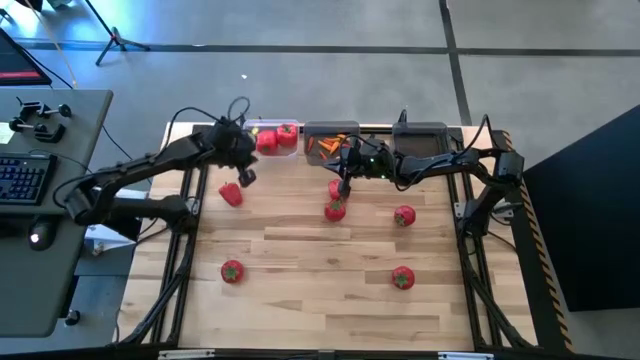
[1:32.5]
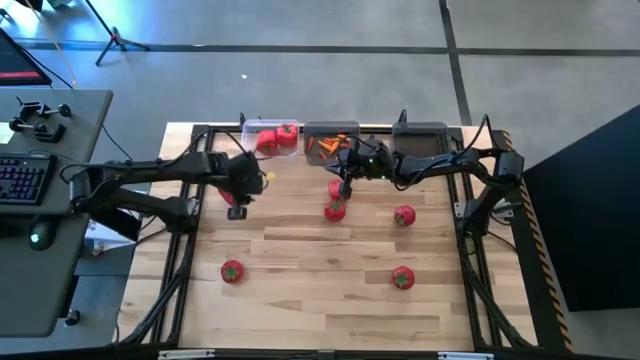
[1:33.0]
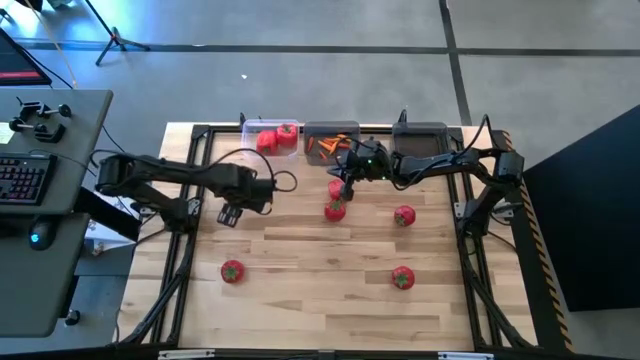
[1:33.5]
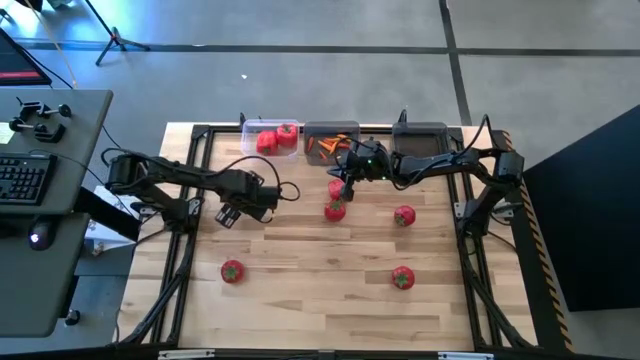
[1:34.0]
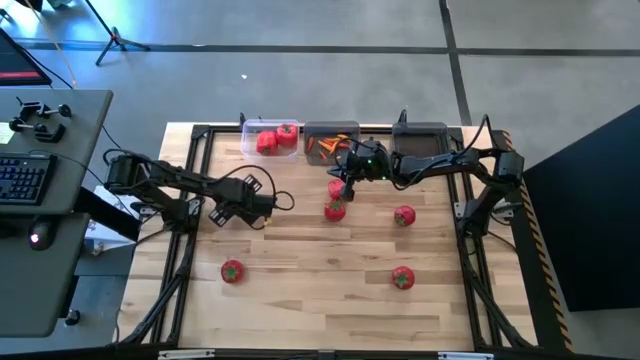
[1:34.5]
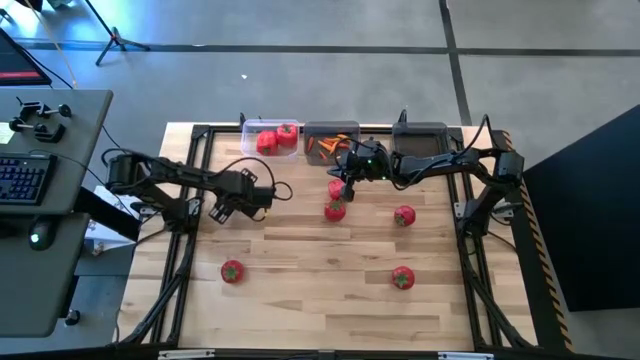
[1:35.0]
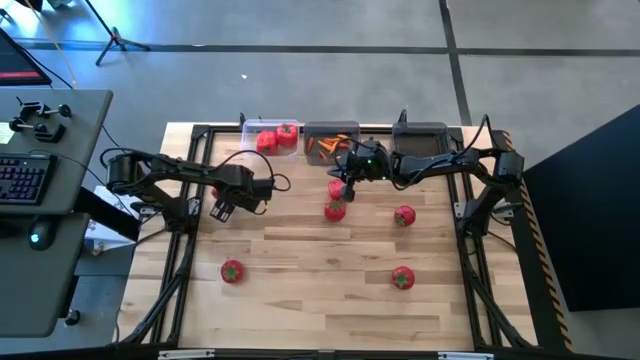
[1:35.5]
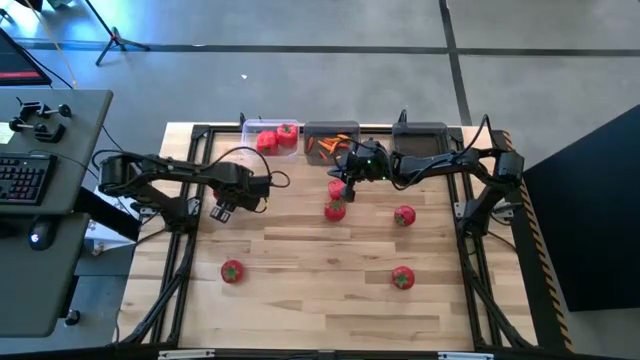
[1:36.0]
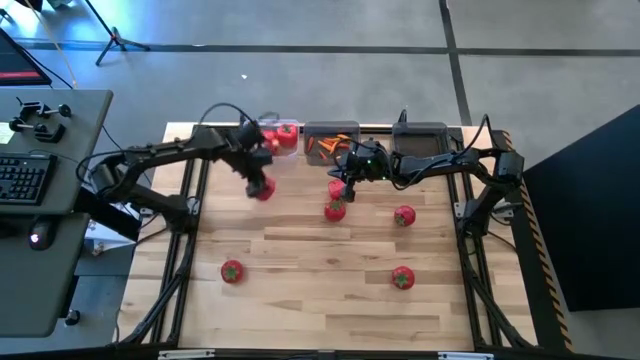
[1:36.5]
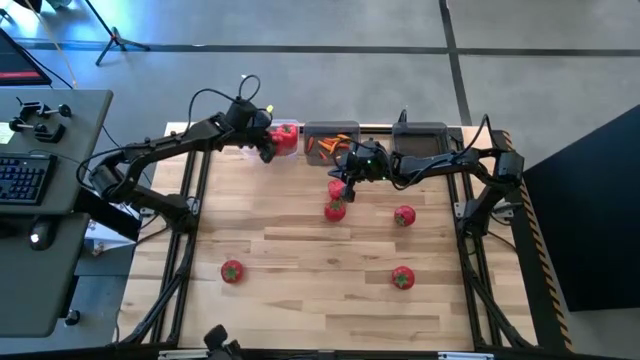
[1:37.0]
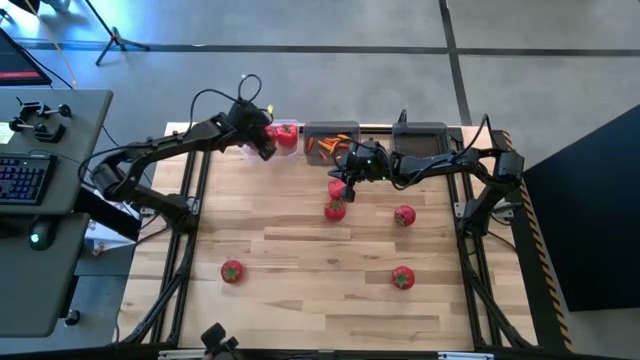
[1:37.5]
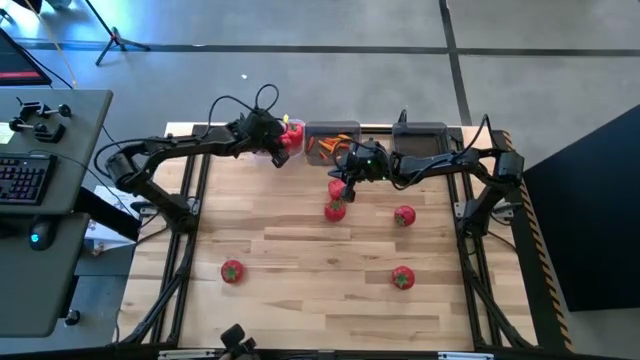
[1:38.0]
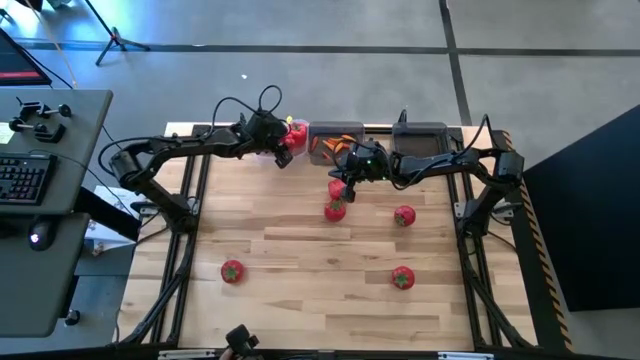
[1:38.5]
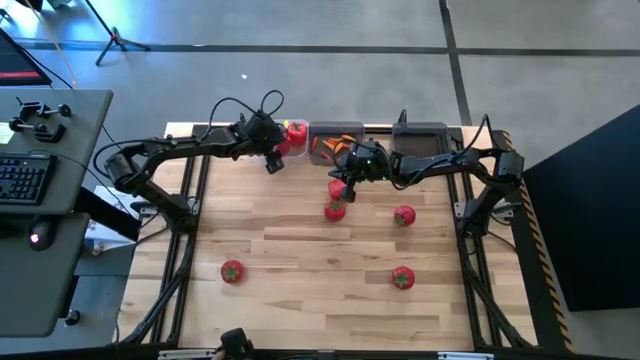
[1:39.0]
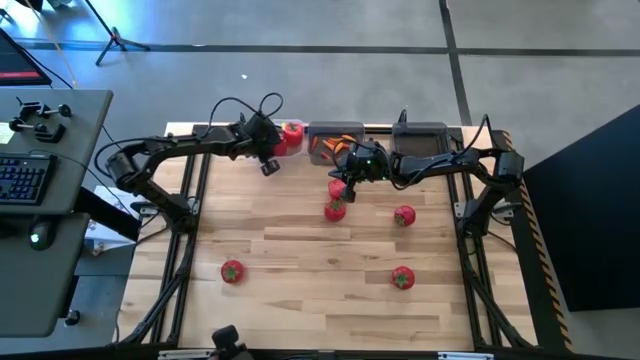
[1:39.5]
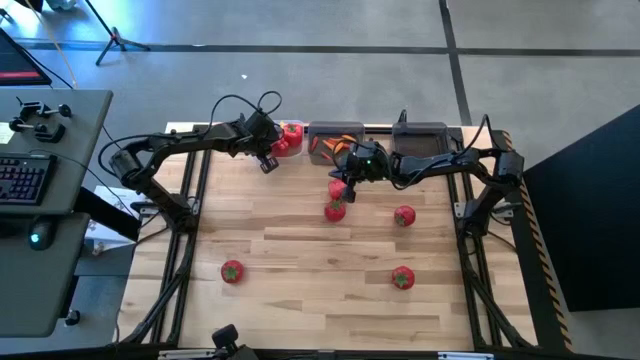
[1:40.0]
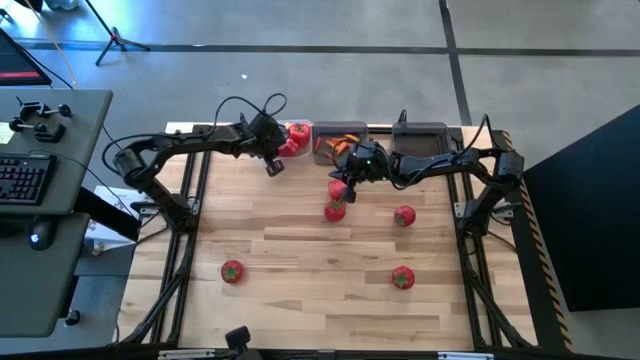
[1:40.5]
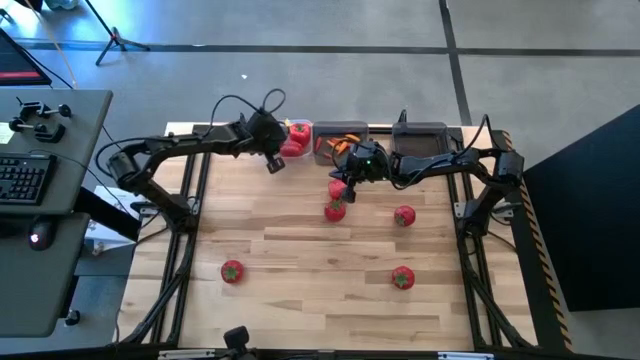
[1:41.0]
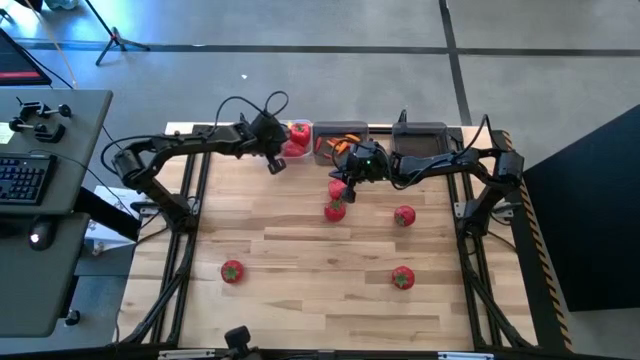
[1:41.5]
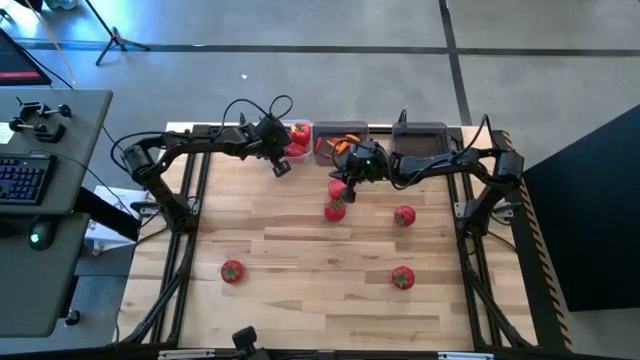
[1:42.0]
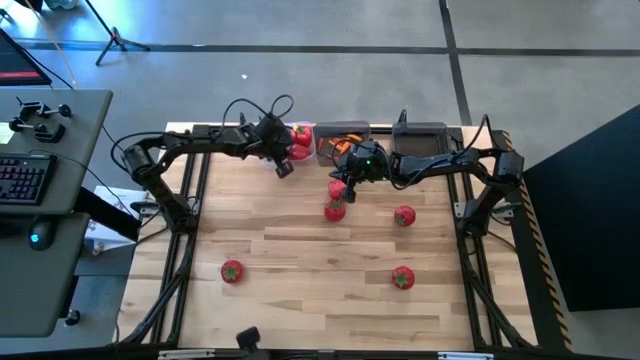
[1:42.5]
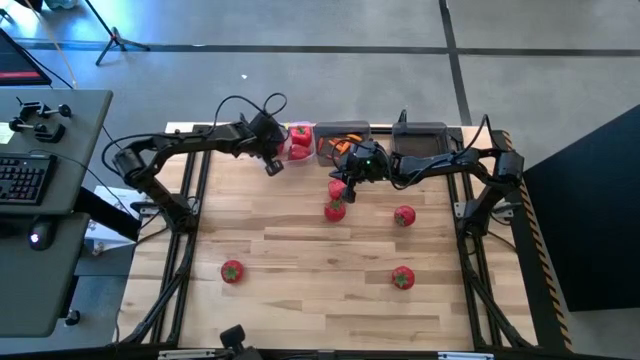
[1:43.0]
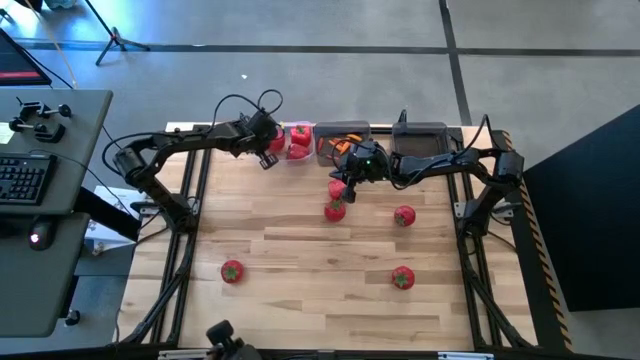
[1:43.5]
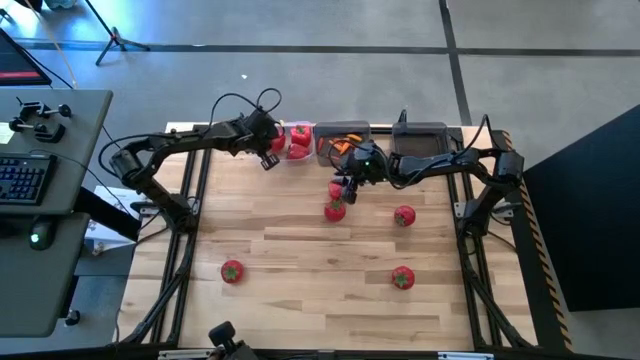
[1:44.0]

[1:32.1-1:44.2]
Task: Sort produce into baskets
Put the red bell pepper into the transparent bin

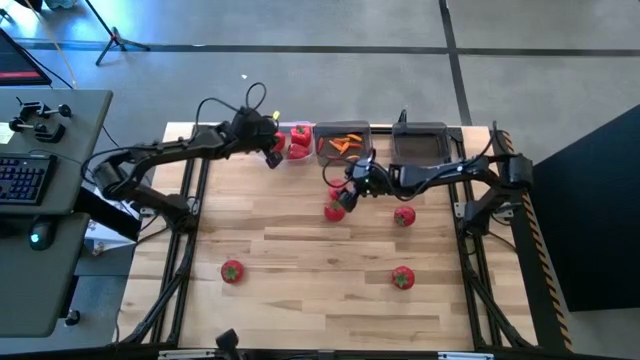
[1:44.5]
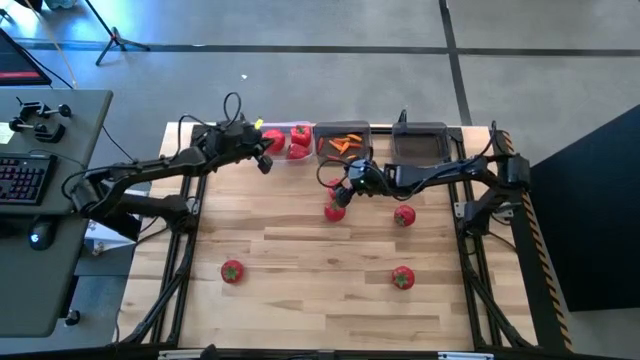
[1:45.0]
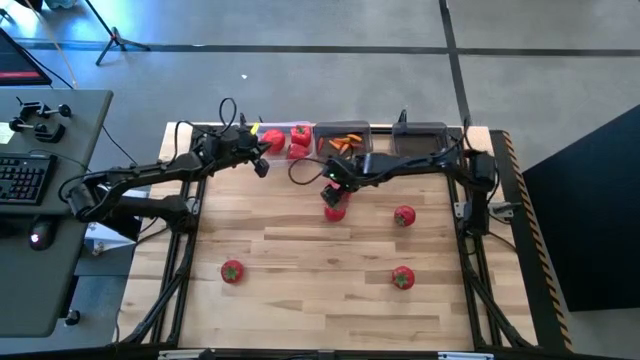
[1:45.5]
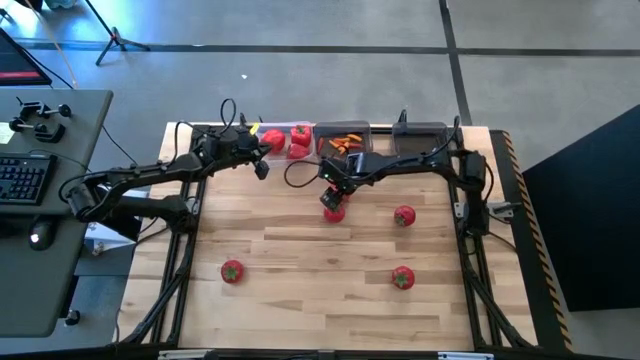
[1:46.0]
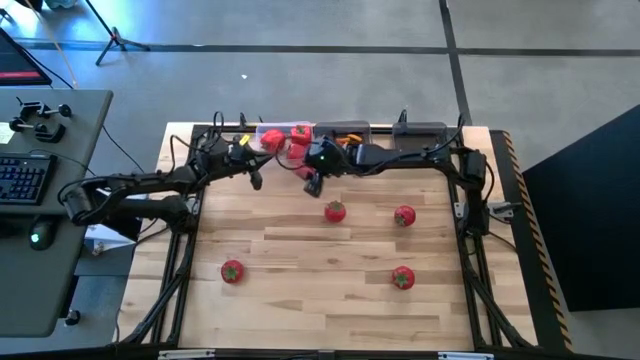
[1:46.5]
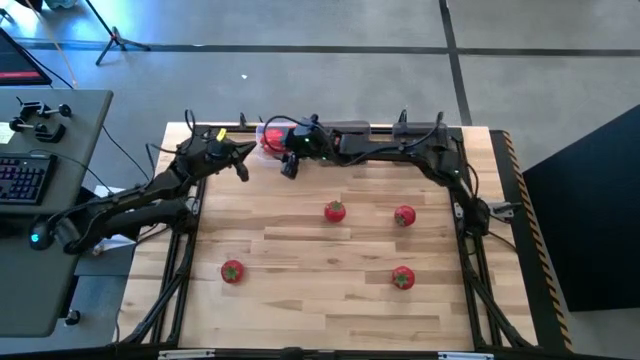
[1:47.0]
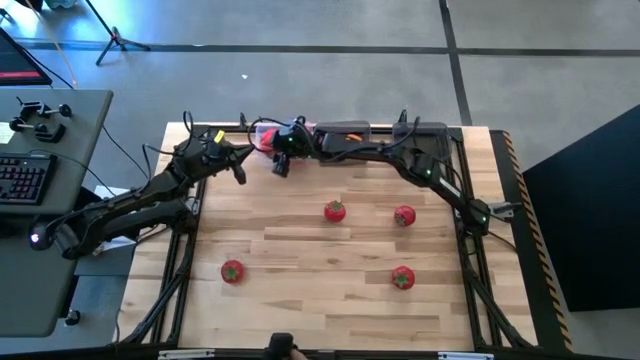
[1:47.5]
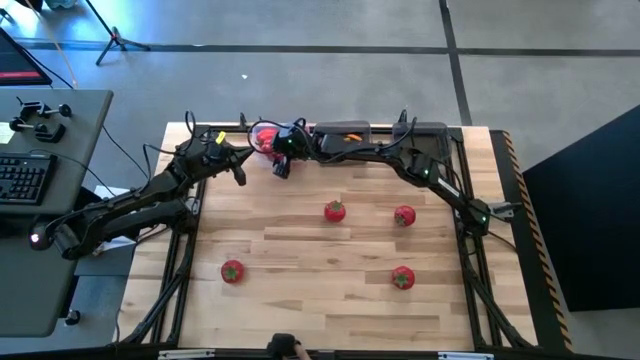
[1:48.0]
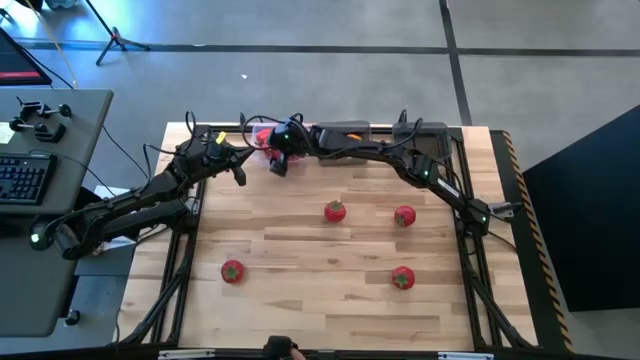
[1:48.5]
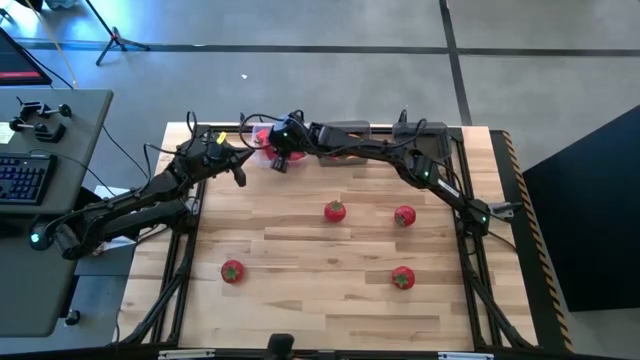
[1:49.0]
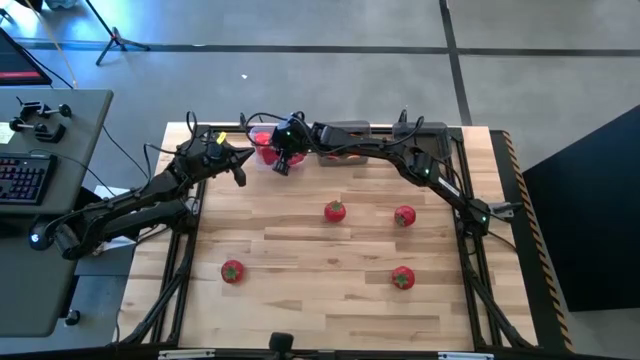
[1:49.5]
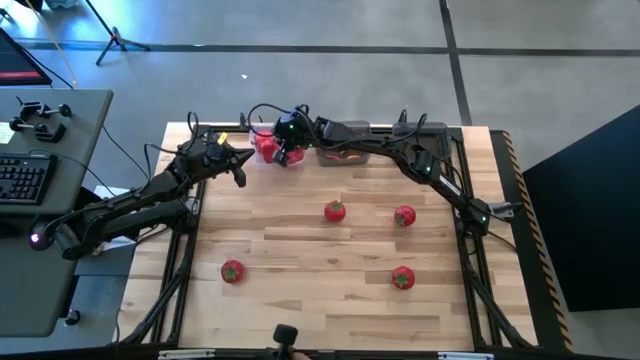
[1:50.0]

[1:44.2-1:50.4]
Put the red bell pepper into the transparent bin

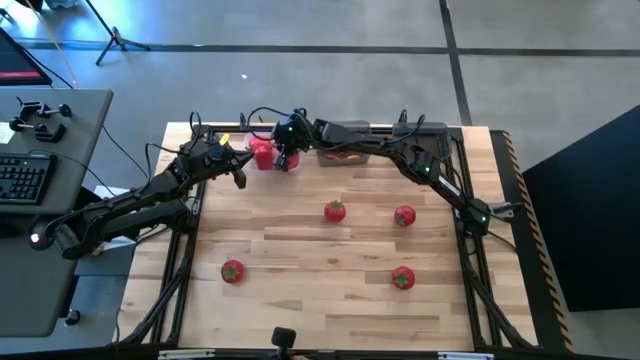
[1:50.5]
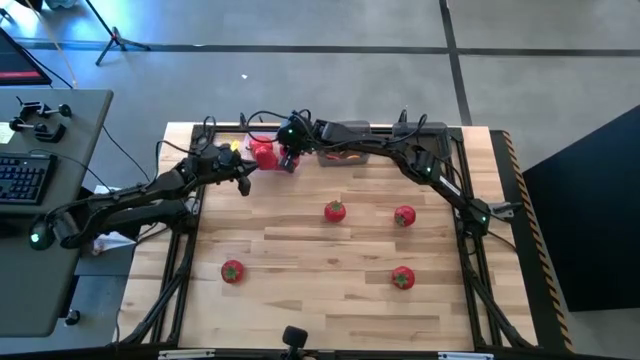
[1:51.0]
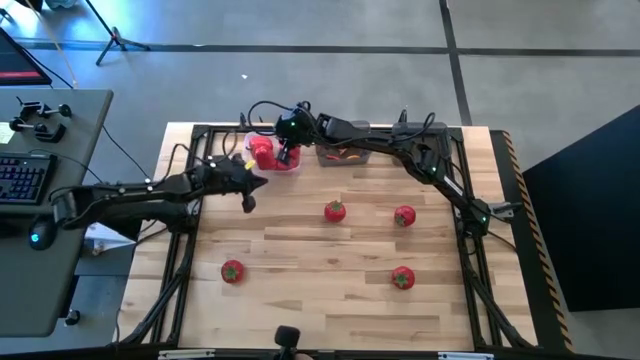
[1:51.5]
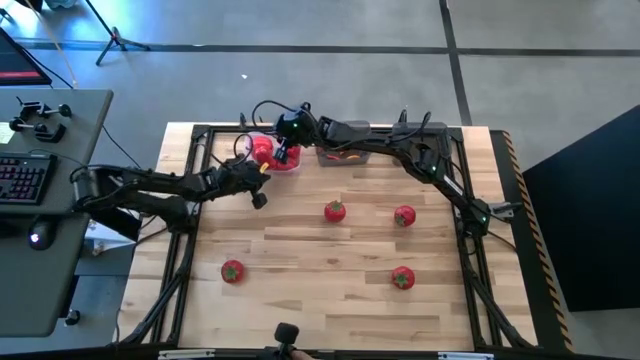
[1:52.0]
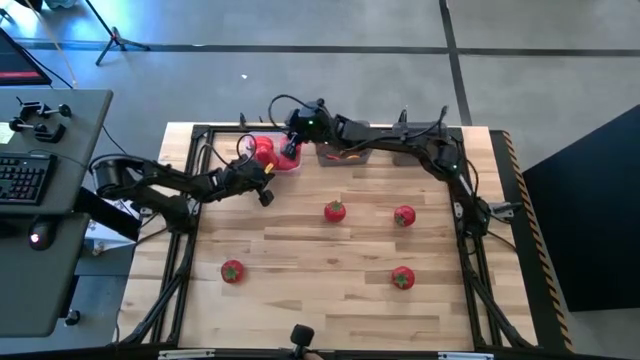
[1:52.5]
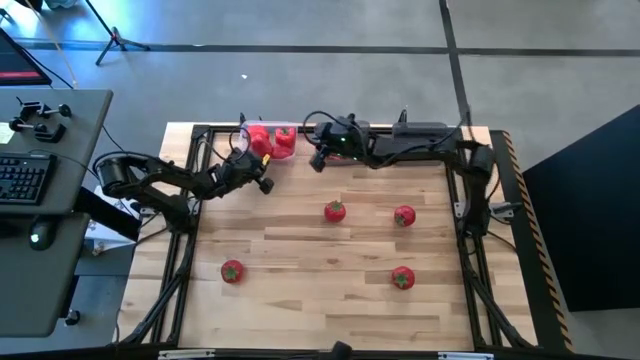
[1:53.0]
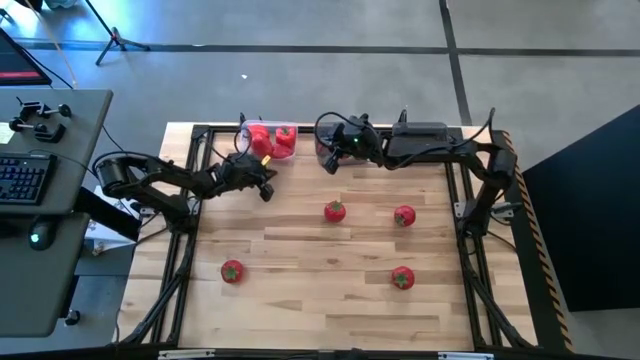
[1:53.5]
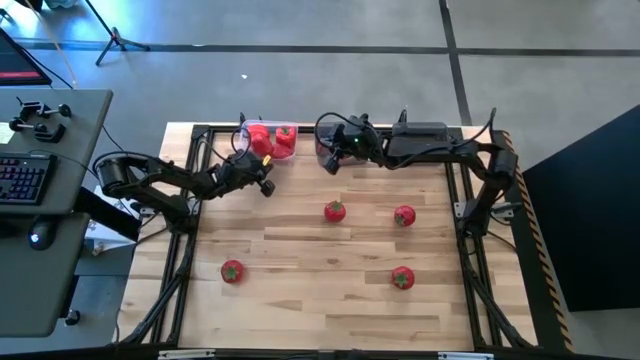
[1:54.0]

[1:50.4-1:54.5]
Adjust the transparent bin

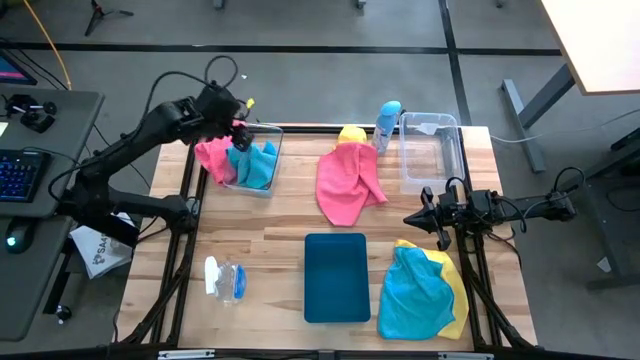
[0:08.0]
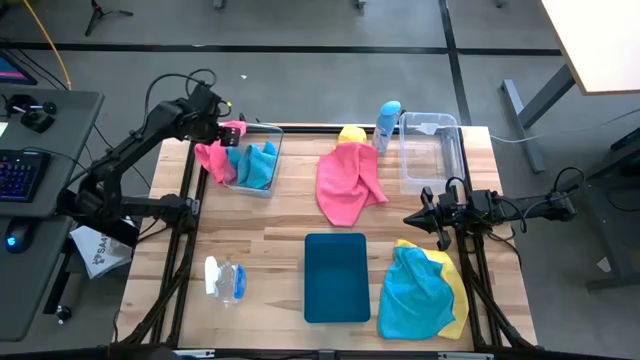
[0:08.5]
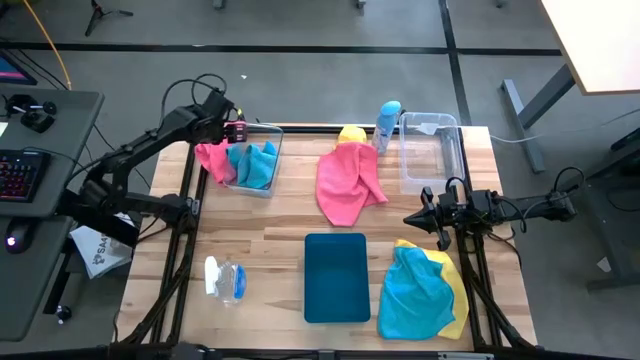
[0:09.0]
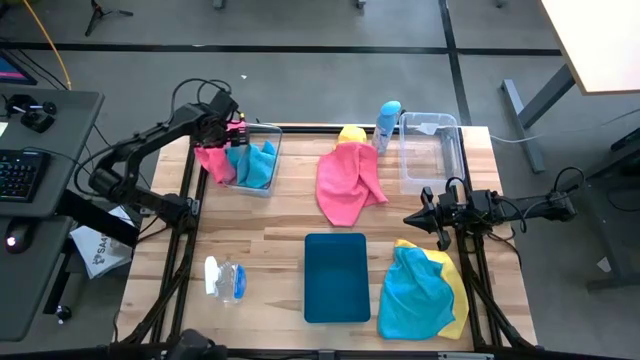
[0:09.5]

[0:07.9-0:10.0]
Task: Sort microfiber towel by color & place in baskets
Put the top blue towel into the left transparent bin
